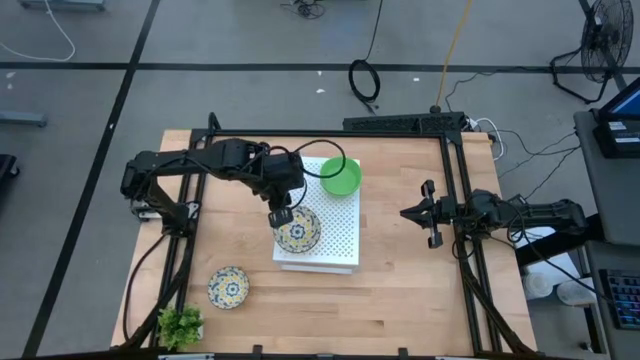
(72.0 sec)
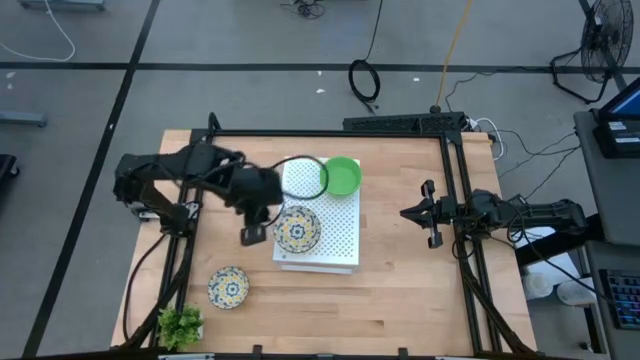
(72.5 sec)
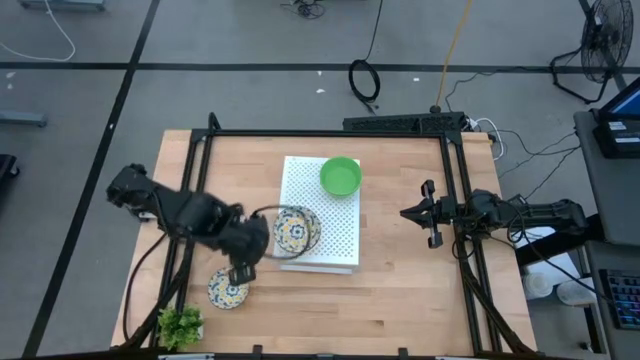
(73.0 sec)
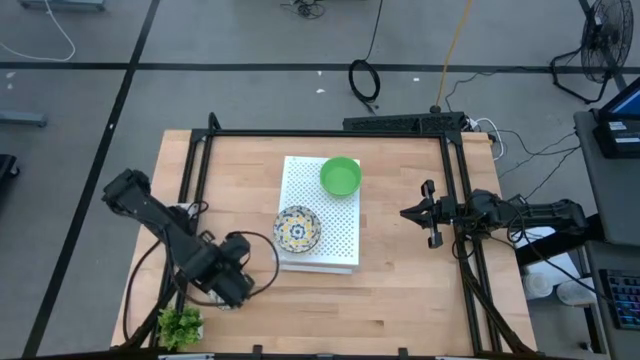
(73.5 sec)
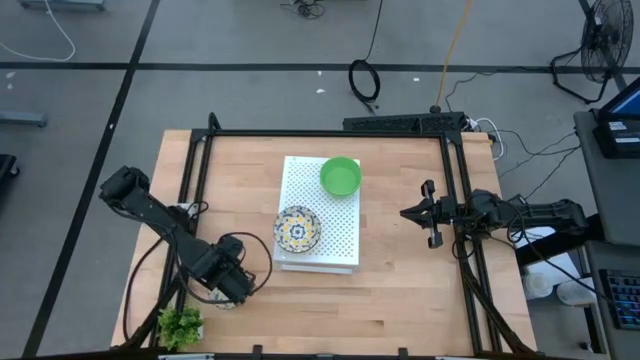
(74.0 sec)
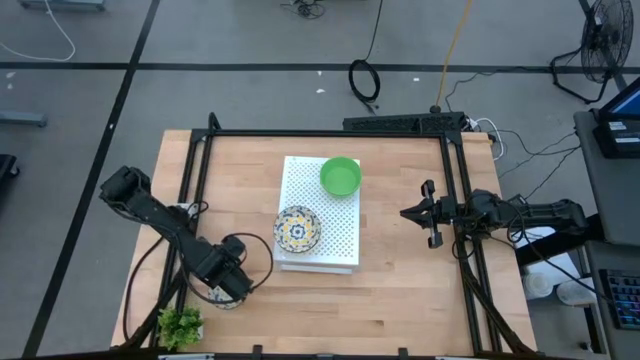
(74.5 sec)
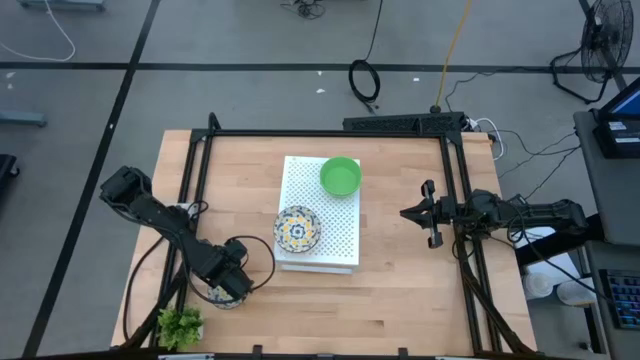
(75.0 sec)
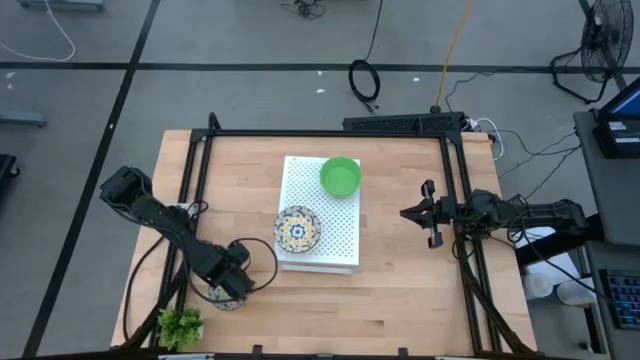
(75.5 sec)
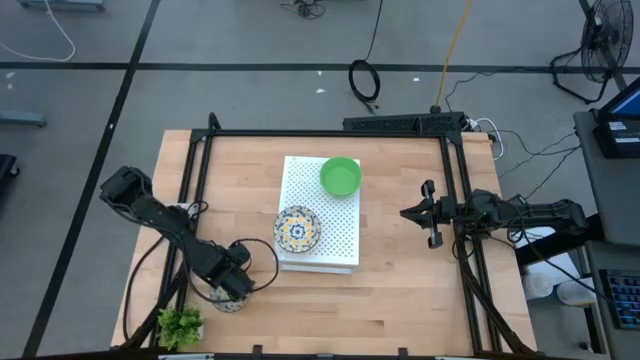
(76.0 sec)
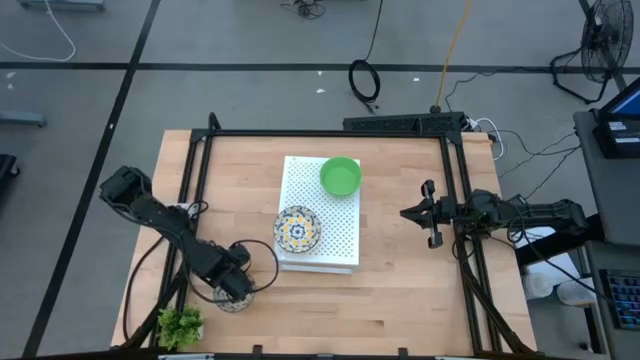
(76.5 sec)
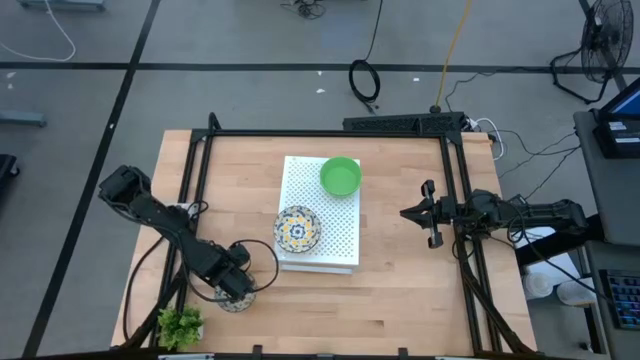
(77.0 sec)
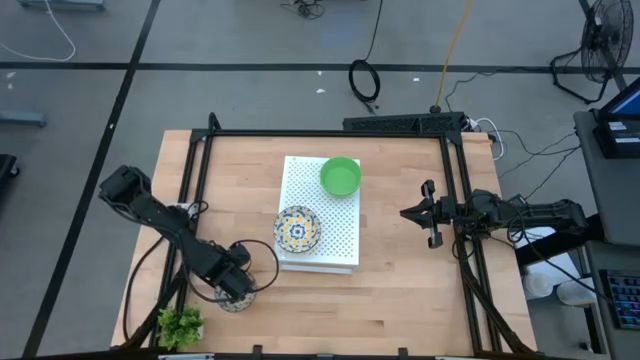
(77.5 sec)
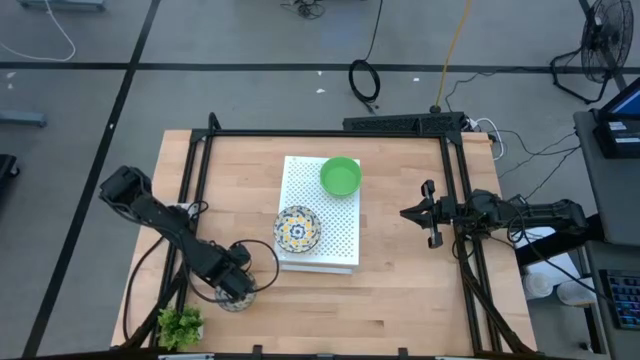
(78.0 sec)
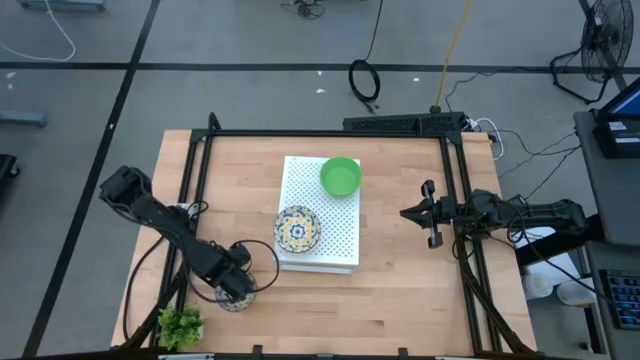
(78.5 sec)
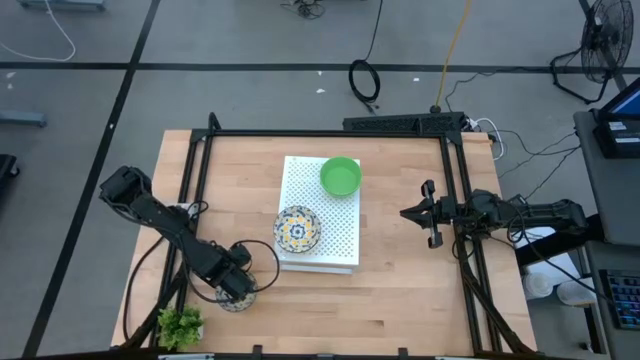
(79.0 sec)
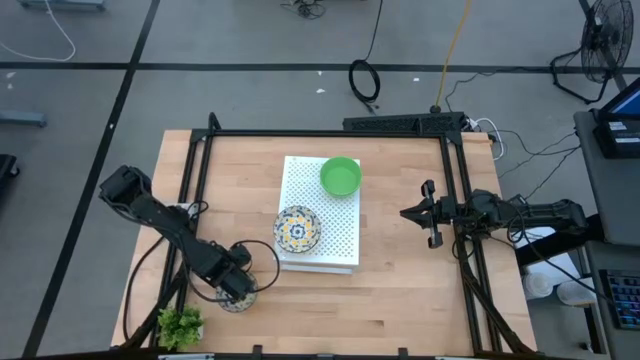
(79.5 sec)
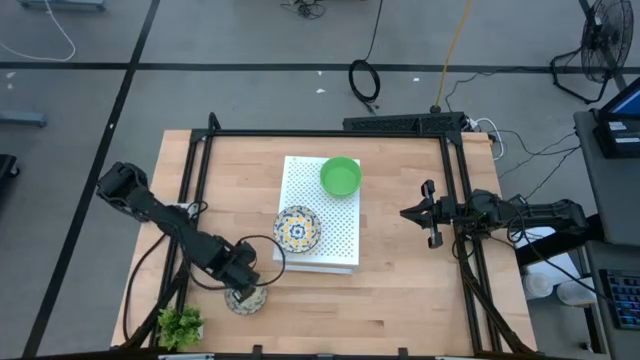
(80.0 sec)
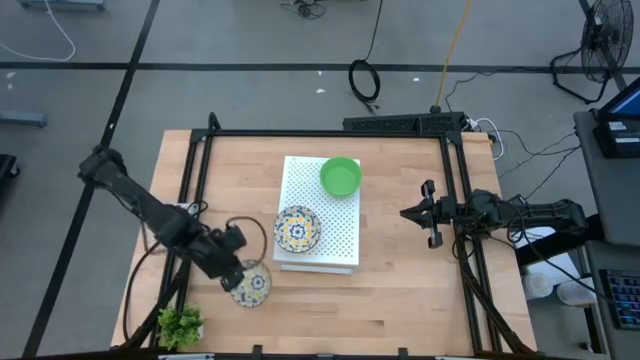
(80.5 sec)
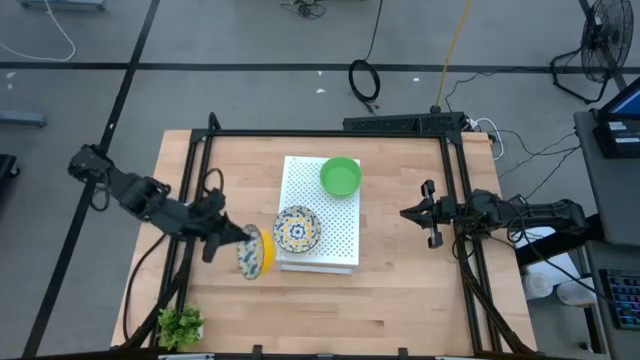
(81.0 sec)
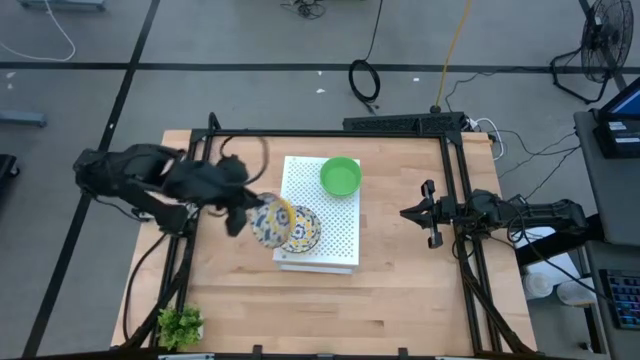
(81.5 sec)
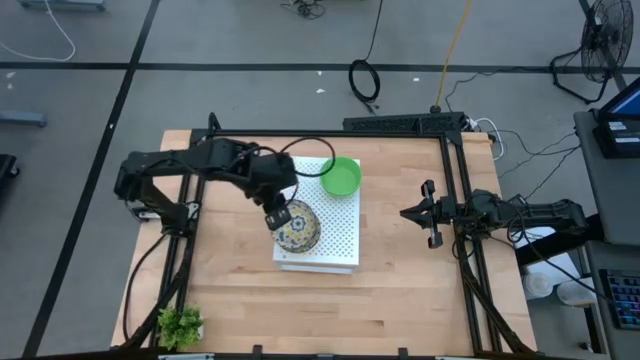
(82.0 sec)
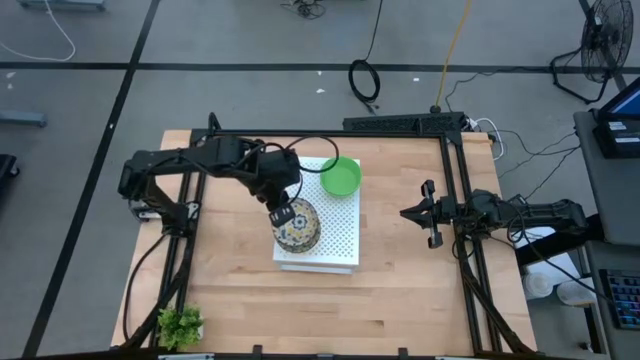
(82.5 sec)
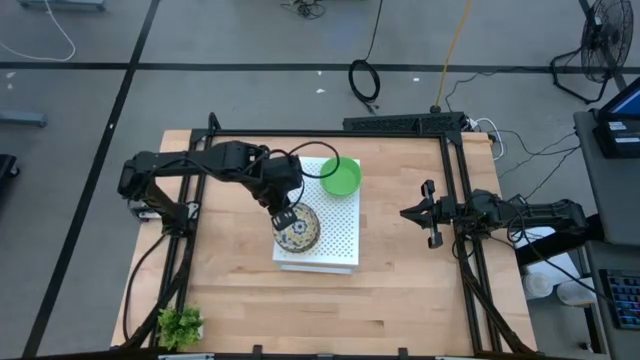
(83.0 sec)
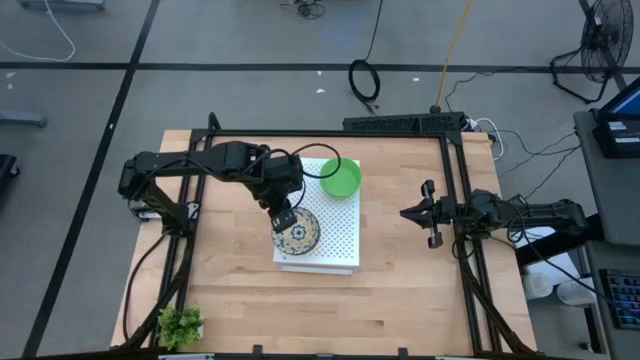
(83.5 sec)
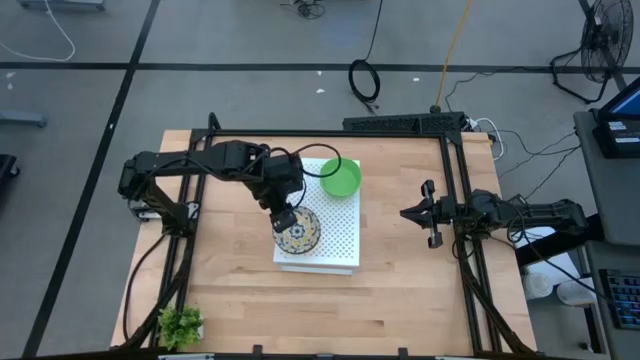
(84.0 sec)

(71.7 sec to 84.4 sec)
Task: Pick & Place Mini bowls
Stack the yellow patterned bowl on the yellow patterned bowl on the shelf

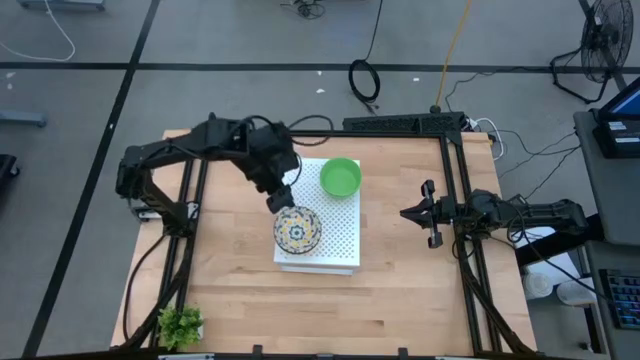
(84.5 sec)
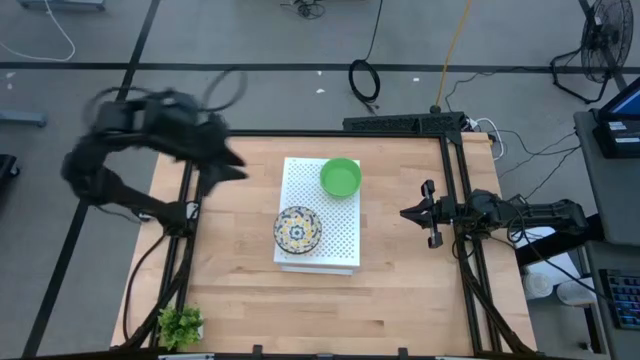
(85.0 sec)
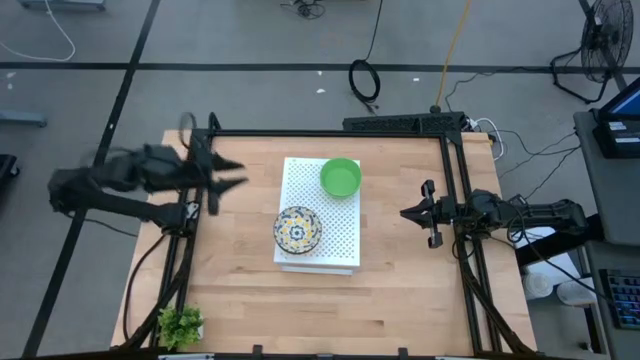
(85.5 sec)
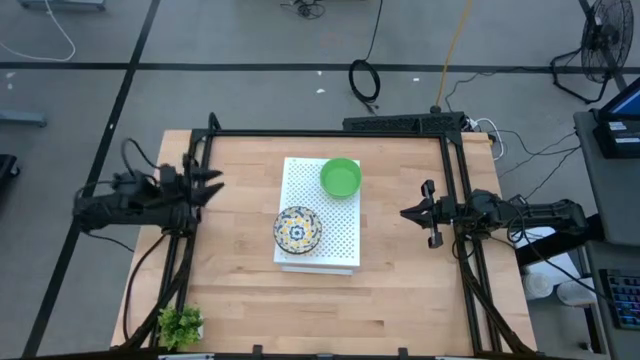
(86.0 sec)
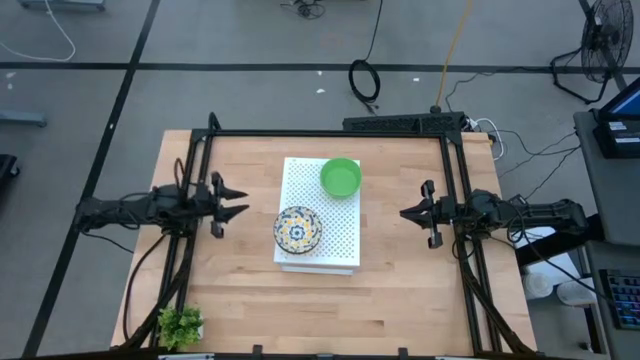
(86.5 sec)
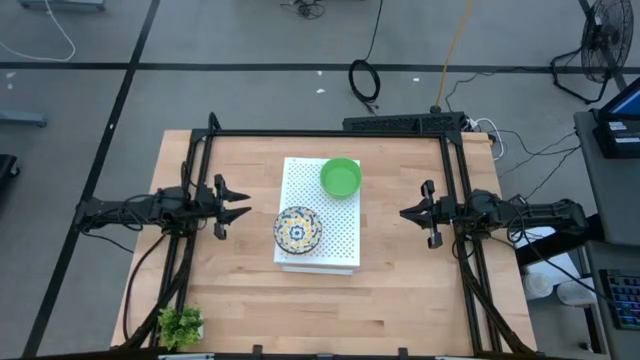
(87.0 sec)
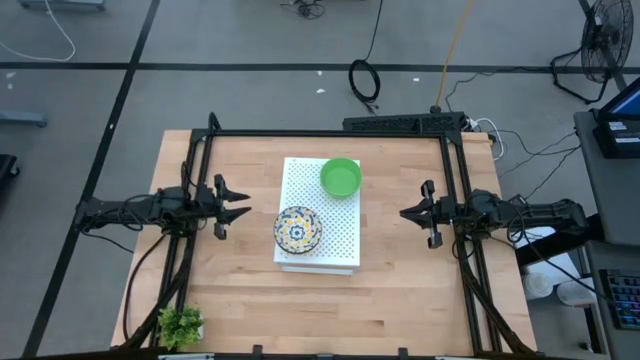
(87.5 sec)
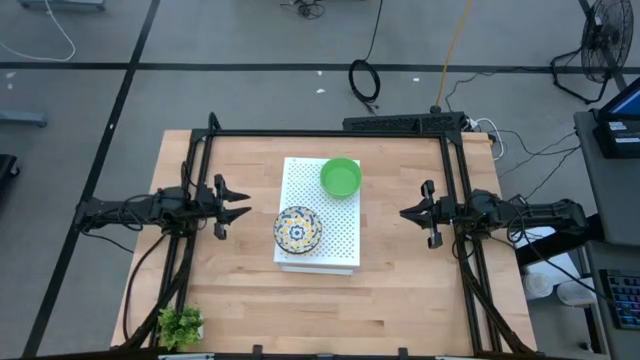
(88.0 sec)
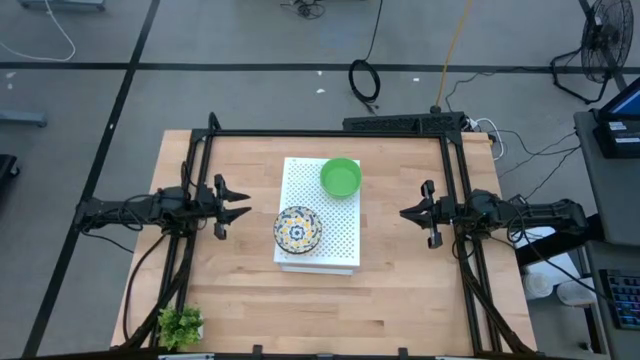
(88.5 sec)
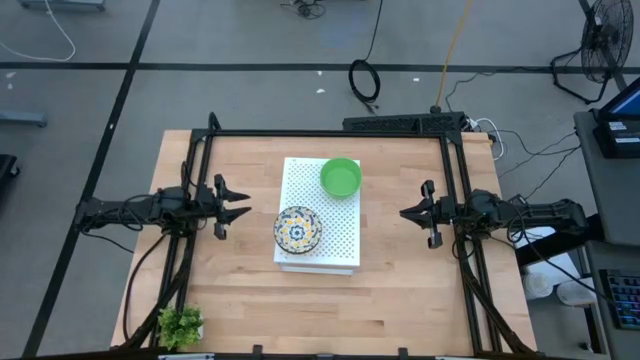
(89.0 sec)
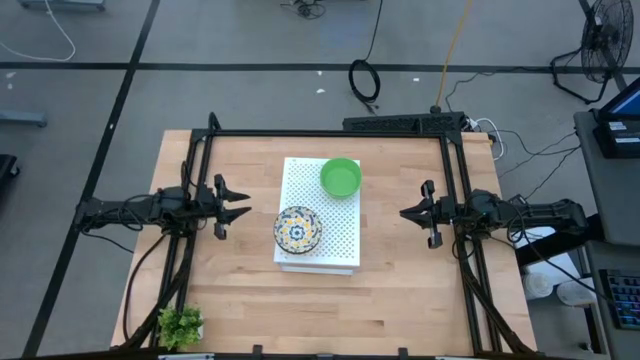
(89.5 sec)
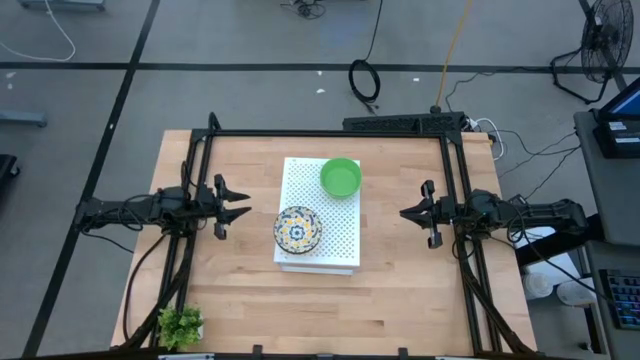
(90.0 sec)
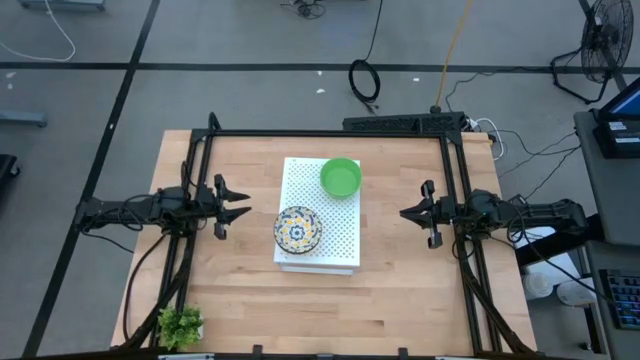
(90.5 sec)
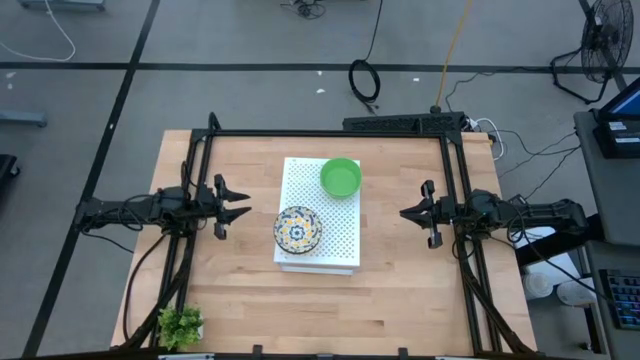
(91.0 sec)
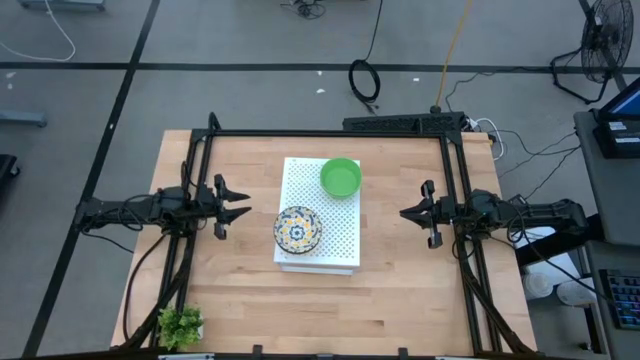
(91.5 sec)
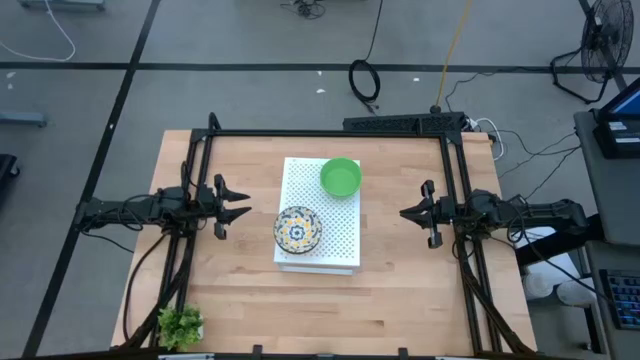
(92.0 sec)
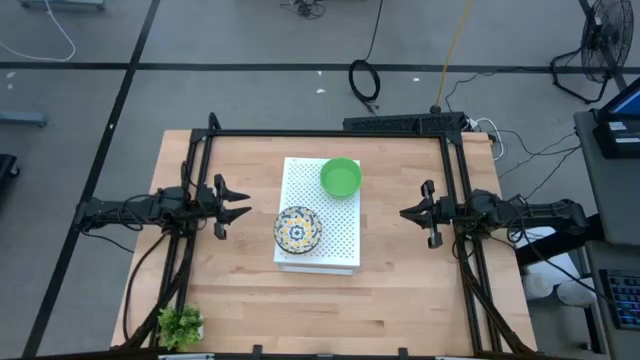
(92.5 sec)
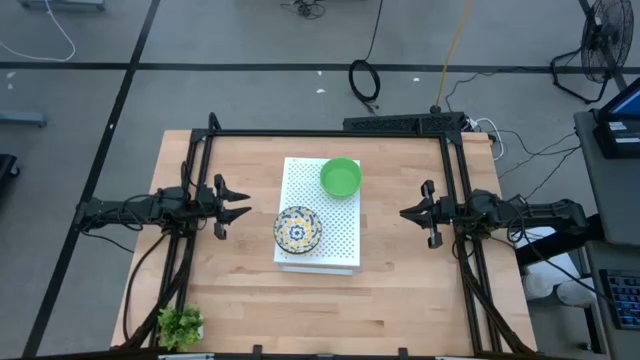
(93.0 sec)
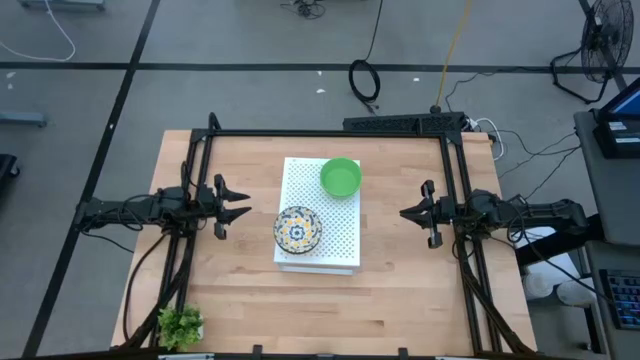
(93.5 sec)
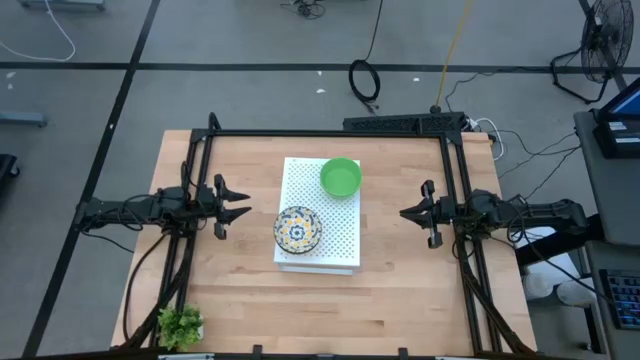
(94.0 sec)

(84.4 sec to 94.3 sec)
Return to Home Position
